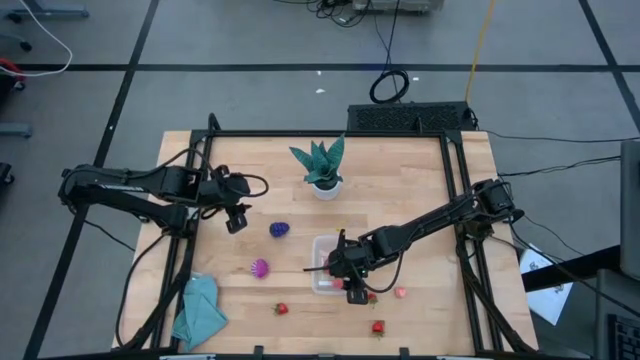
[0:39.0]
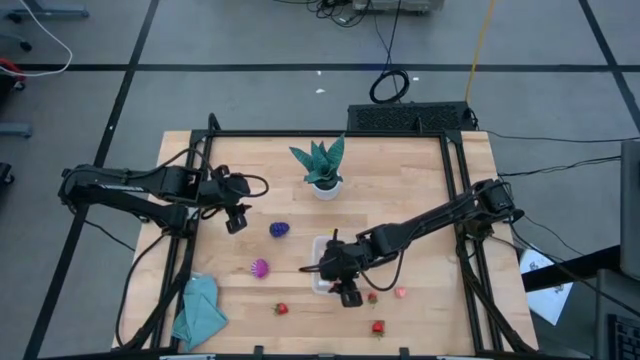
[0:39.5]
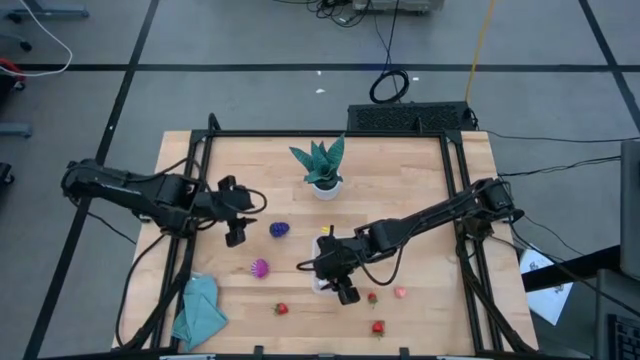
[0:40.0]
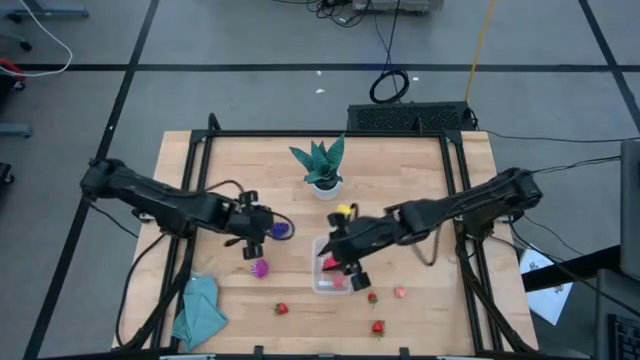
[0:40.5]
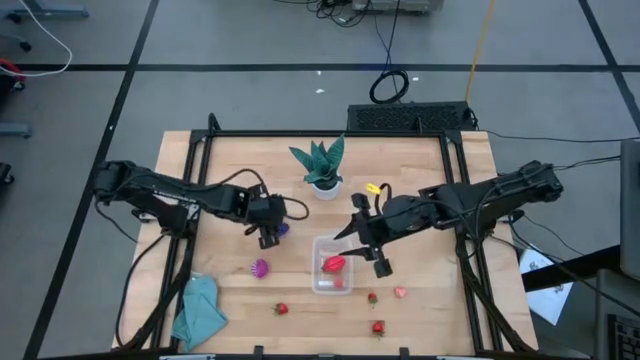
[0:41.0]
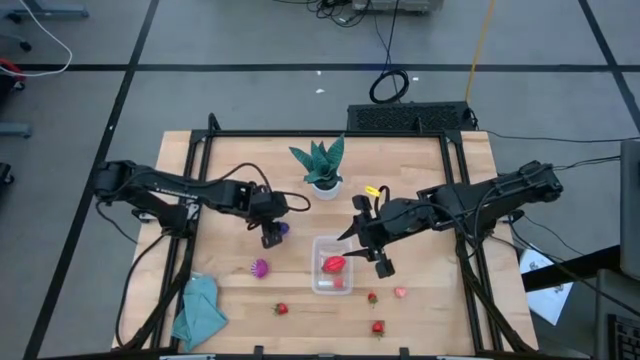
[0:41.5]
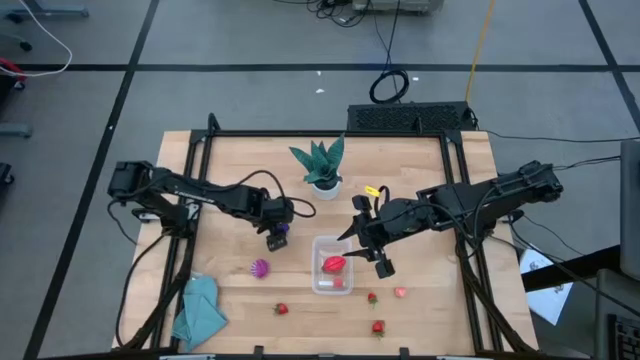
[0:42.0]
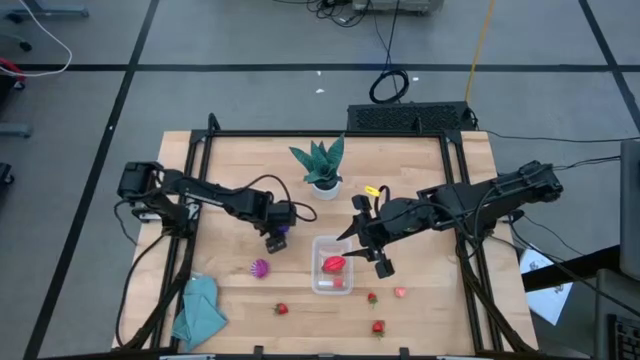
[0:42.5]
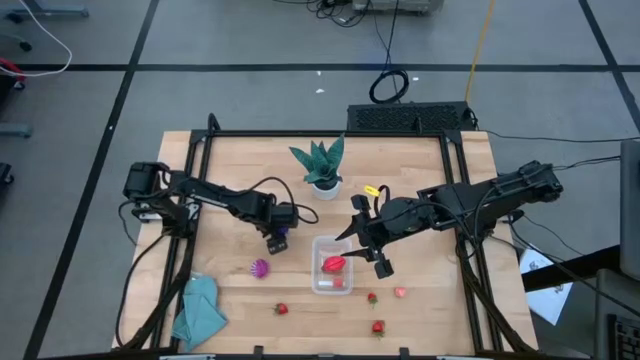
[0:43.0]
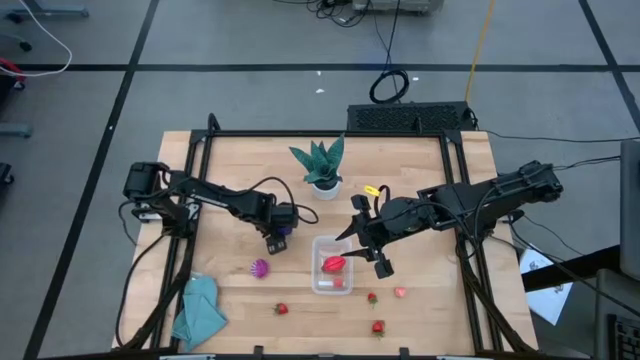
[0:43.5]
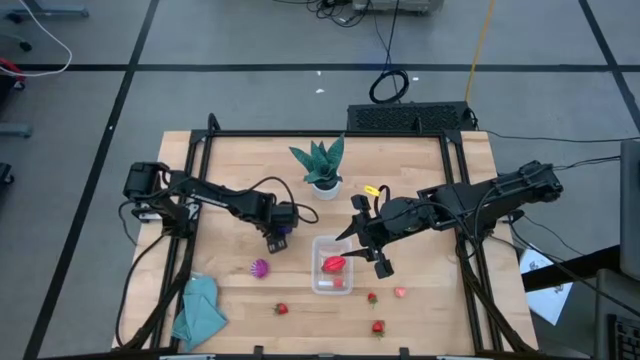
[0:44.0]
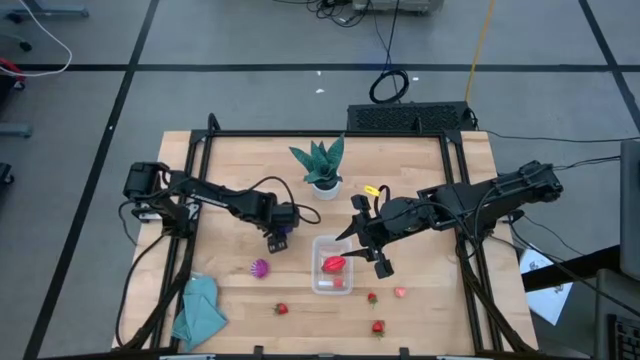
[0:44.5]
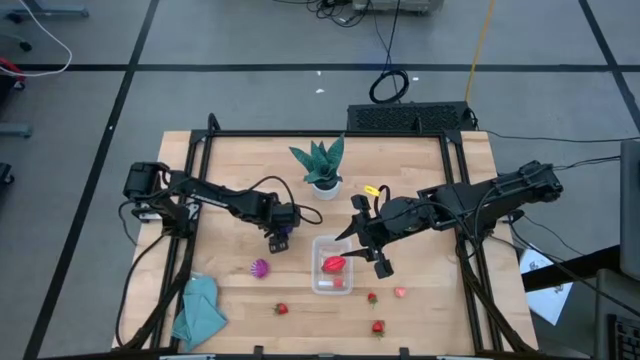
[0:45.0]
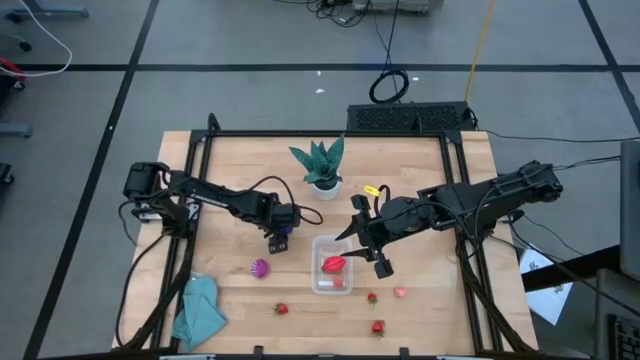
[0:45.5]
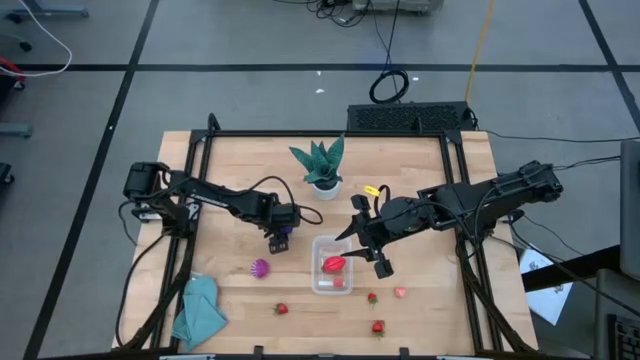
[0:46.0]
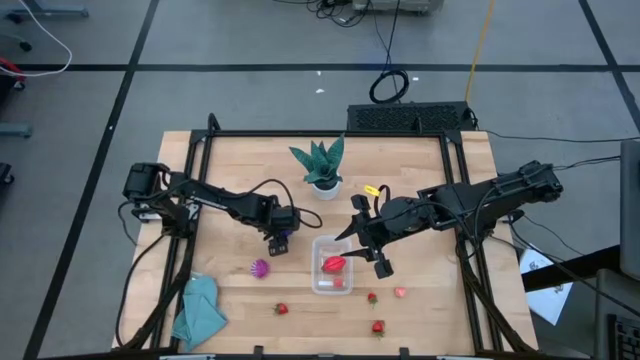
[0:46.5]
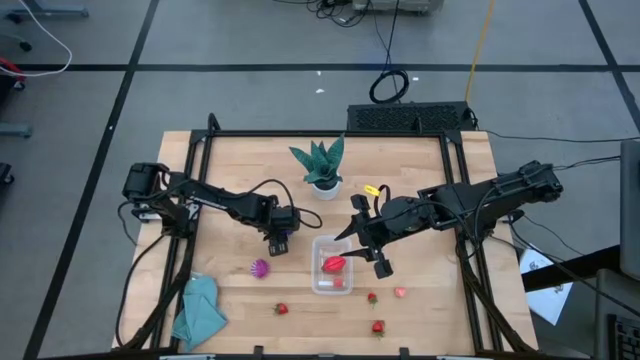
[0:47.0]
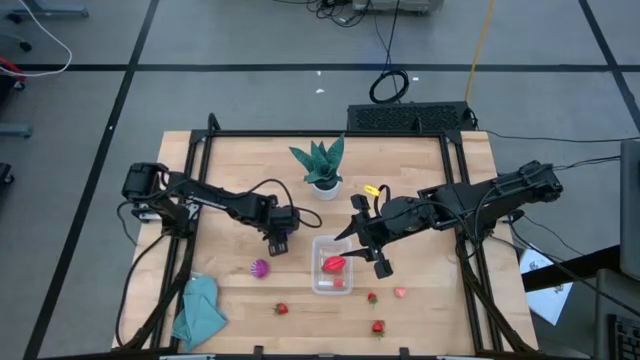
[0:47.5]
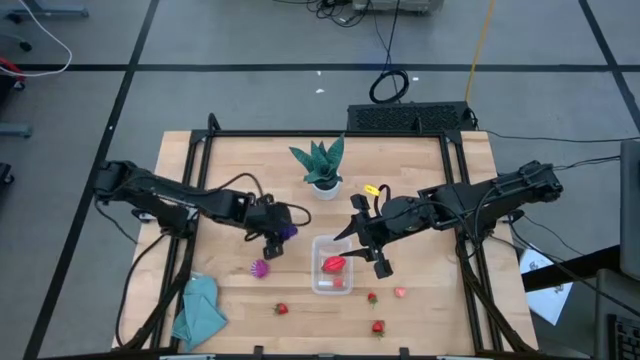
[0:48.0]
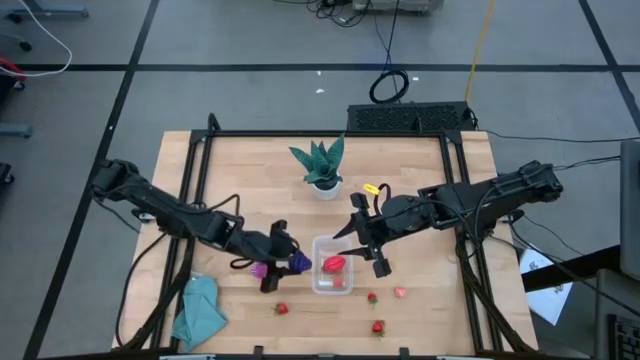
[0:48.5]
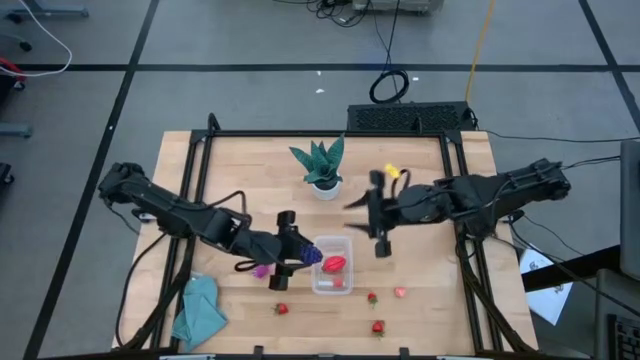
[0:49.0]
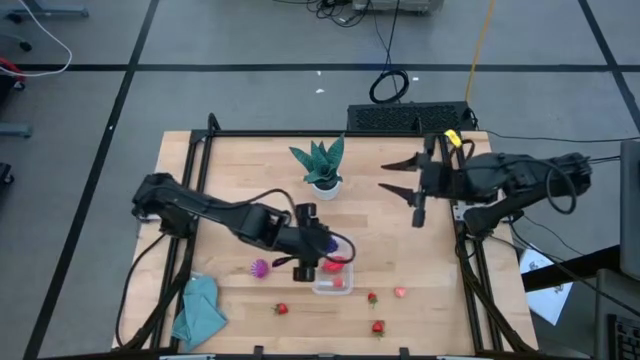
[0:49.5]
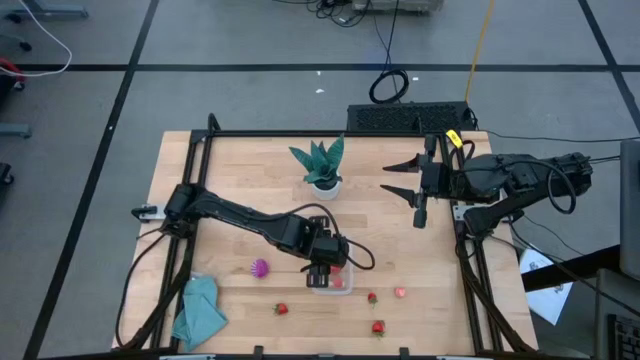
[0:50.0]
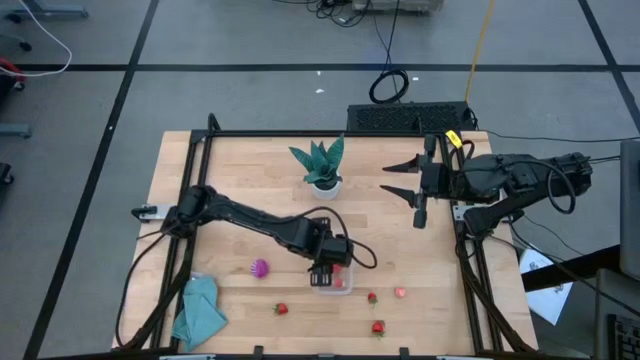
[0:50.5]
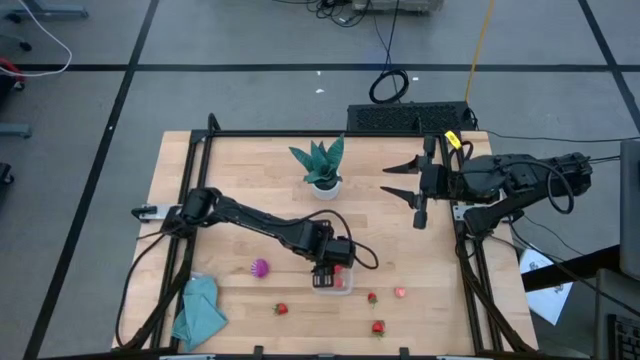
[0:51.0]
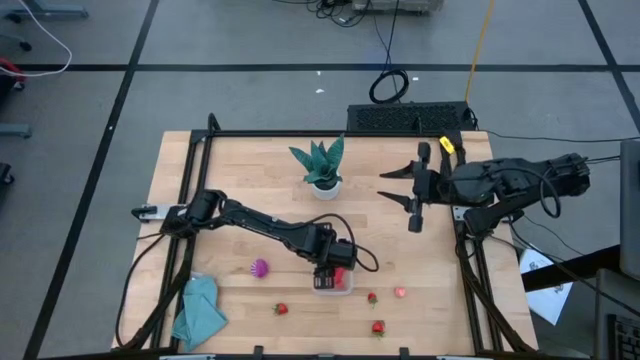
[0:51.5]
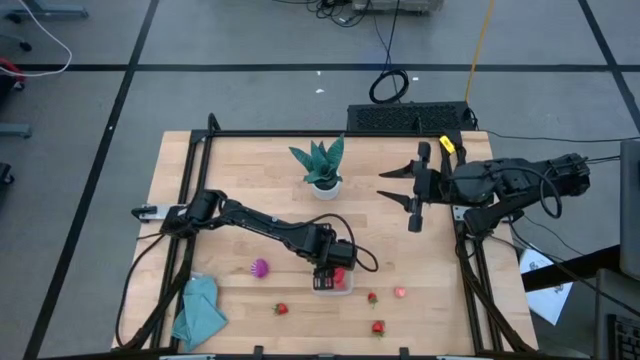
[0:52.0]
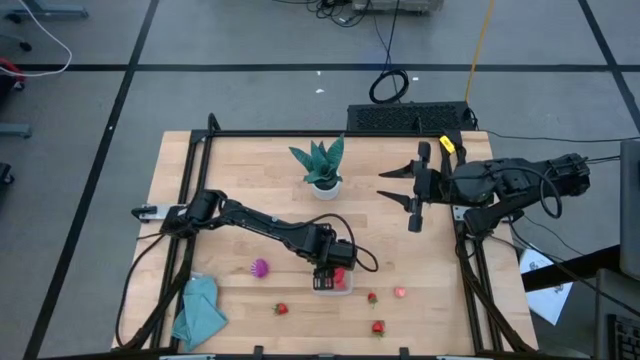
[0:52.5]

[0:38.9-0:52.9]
Task: Pick and placing Produce into tupperware
Put the blue grapes into the transparent bin

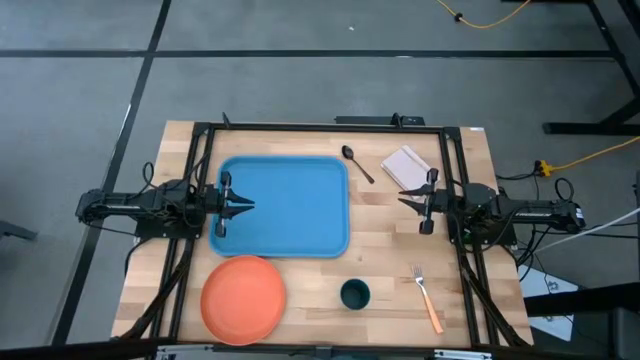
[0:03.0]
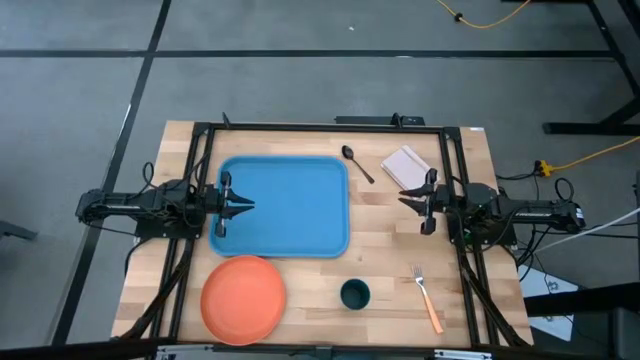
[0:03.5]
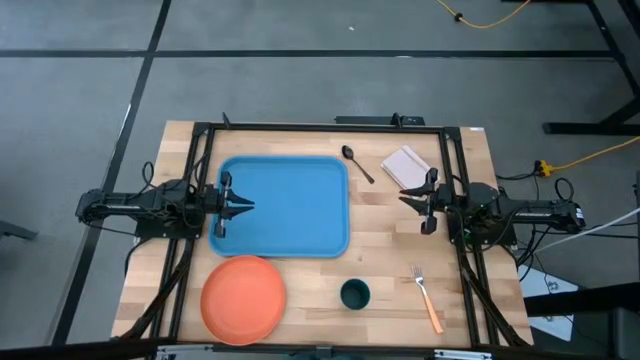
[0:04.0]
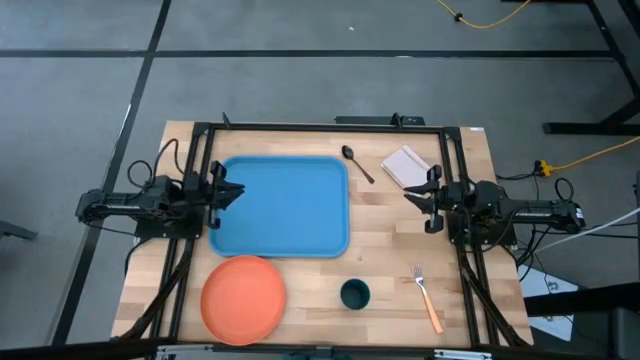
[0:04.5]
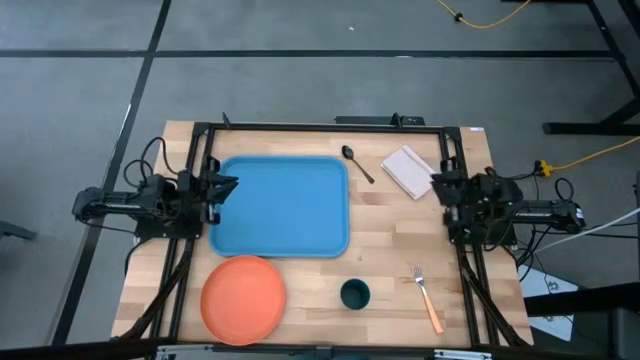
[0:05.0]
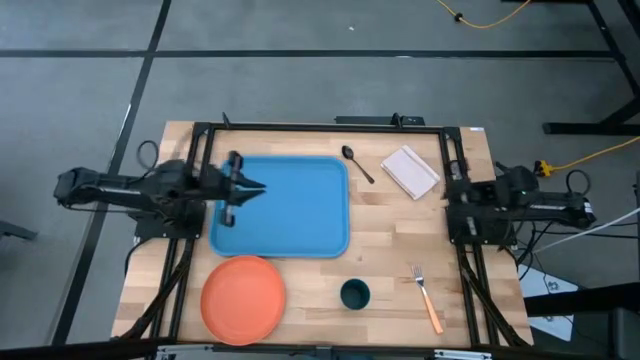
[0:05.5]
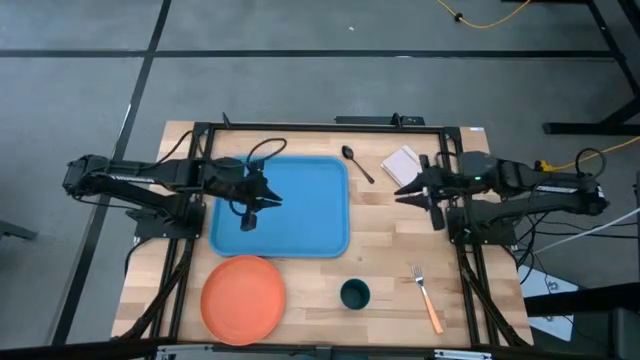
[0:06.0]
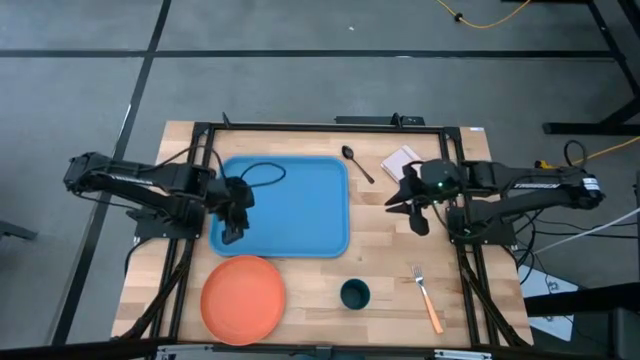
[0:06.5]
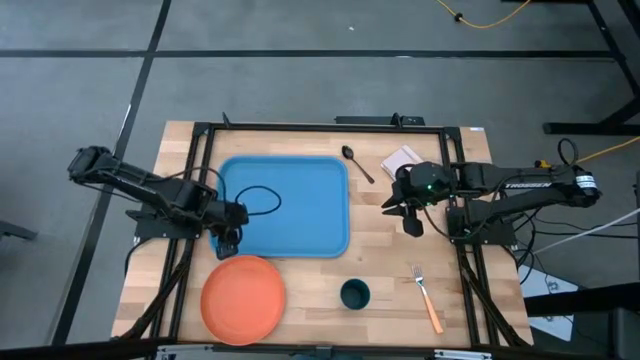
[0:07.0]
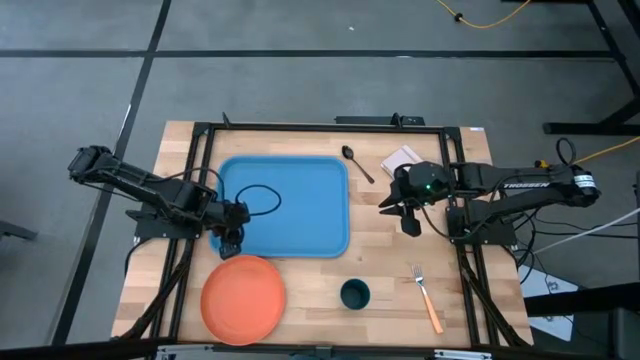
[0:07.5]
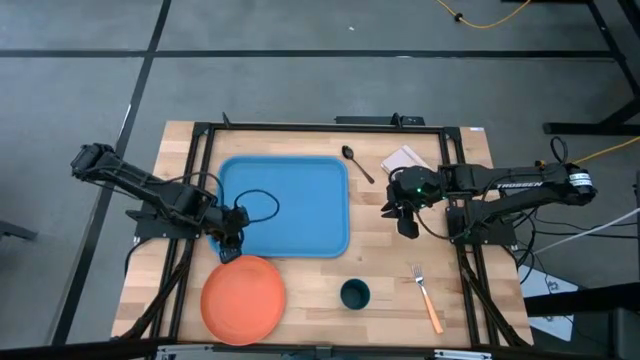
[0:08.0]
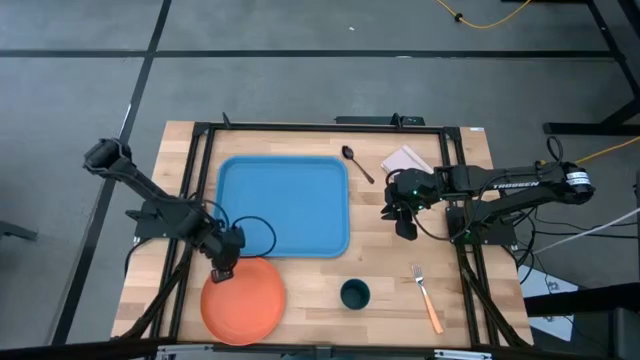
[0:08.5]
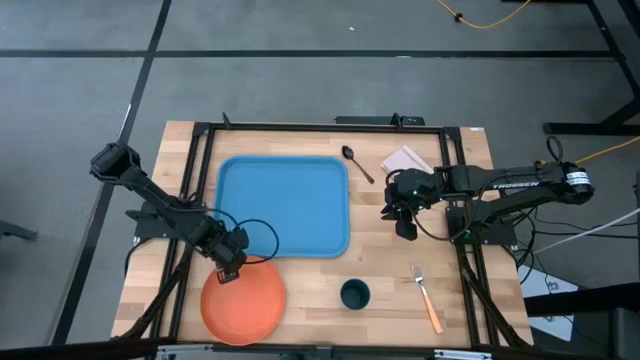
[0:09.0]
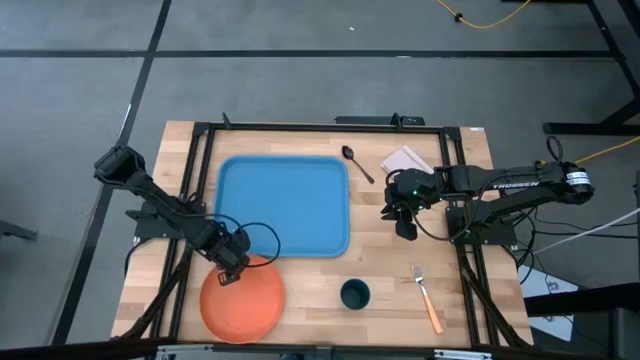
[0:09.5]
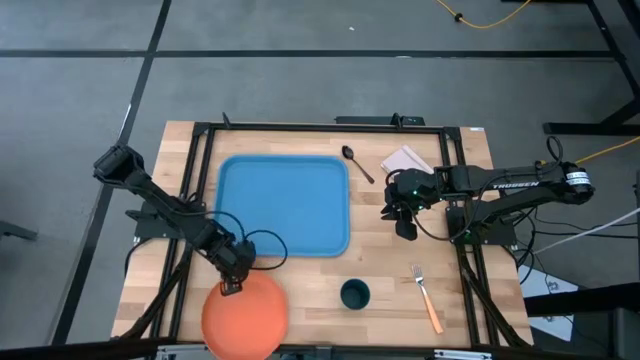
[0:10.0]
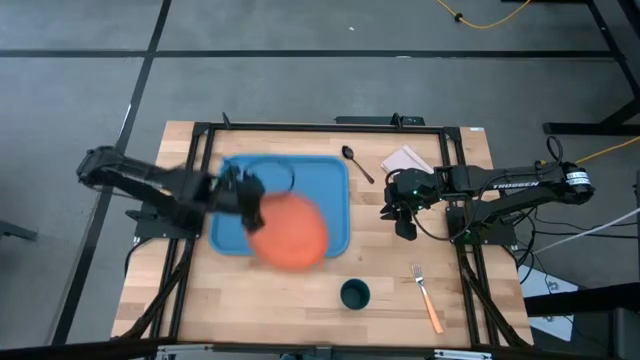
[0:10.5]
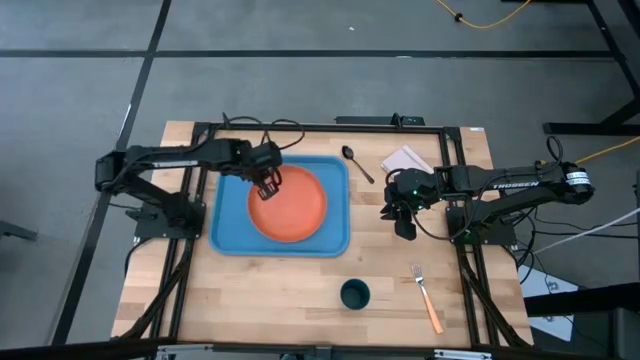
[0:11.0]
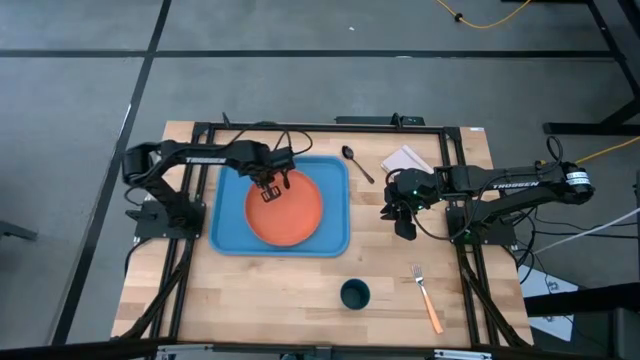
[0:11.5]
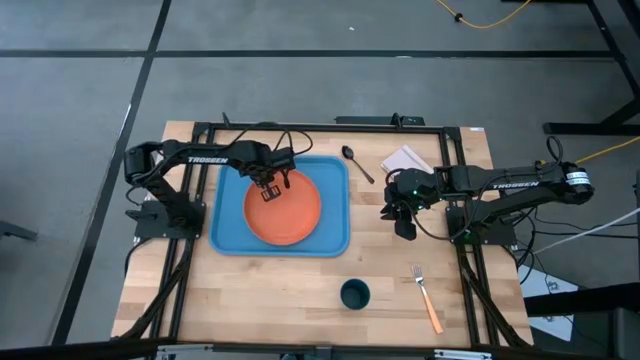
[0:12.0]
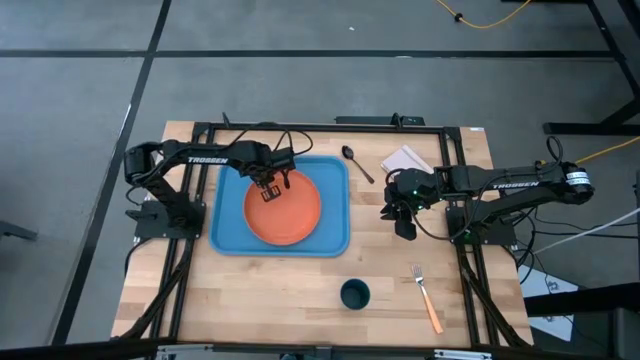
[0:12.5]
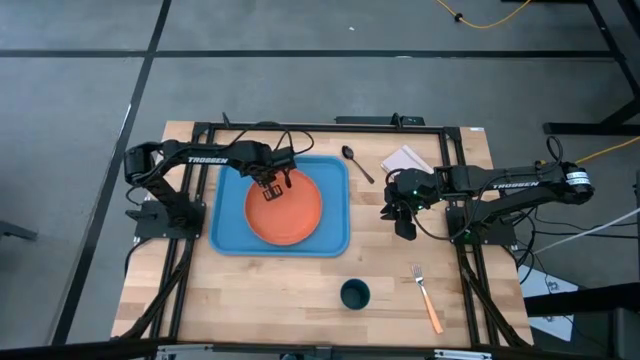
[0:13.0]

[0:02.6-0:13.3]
Task: Pick and place plate/cup/fork/spoon on tray
Put the orange plate on the middle of the blue serving tray
